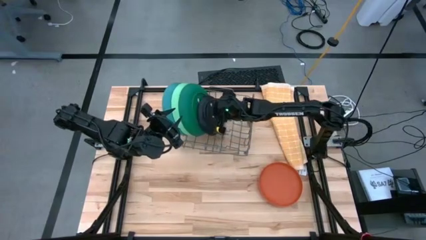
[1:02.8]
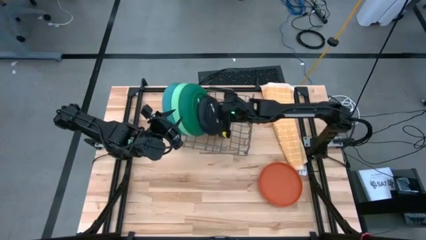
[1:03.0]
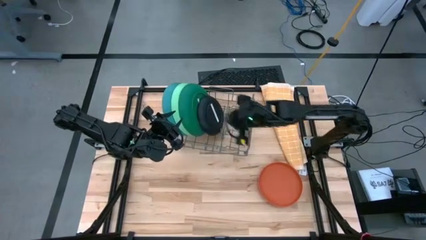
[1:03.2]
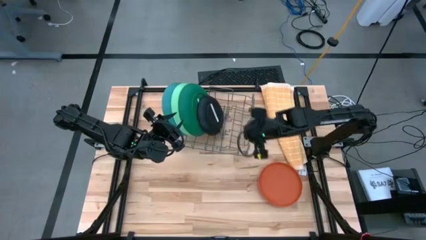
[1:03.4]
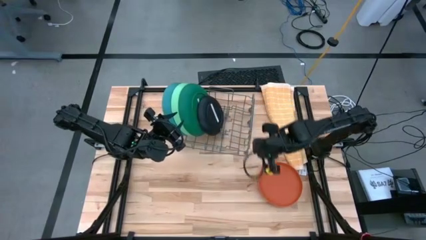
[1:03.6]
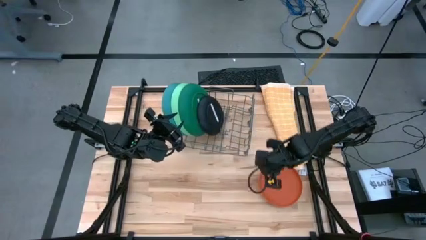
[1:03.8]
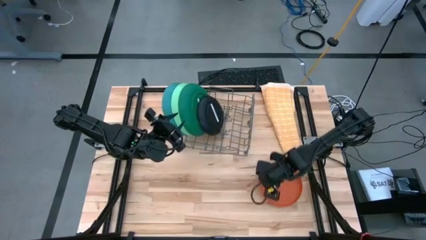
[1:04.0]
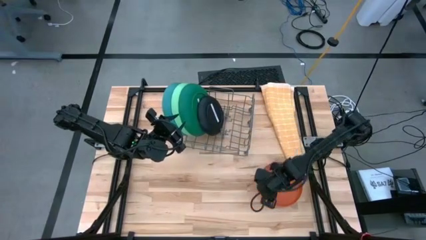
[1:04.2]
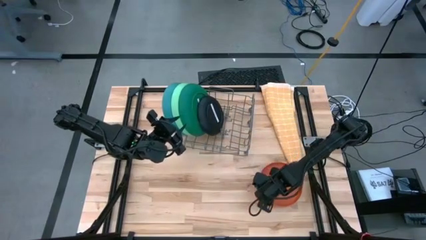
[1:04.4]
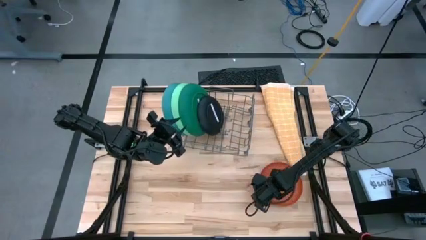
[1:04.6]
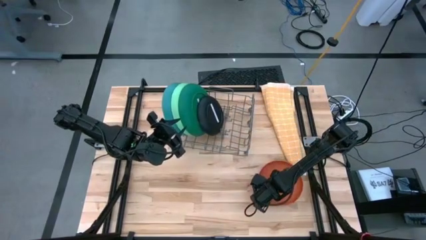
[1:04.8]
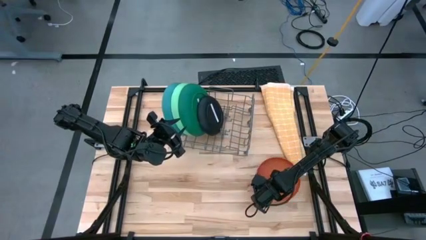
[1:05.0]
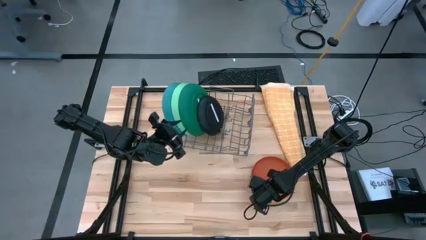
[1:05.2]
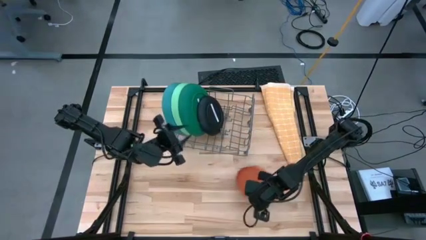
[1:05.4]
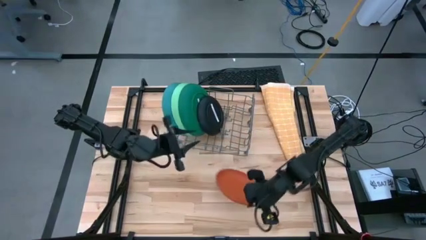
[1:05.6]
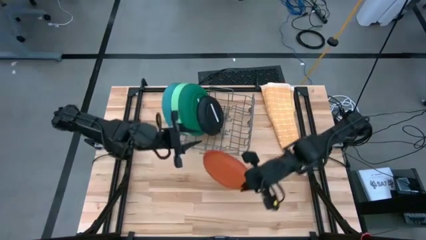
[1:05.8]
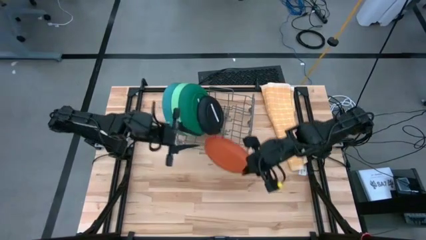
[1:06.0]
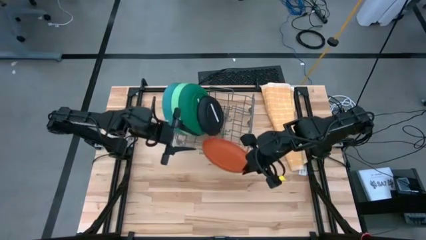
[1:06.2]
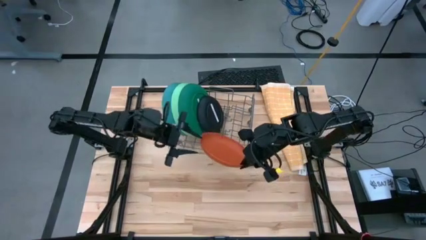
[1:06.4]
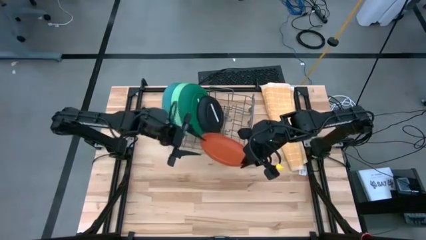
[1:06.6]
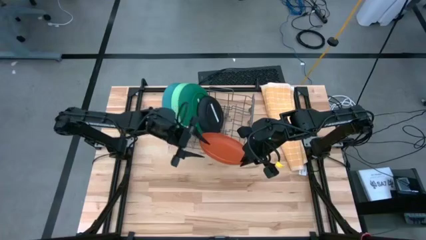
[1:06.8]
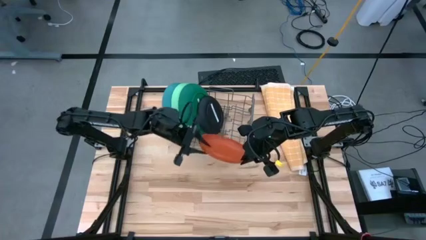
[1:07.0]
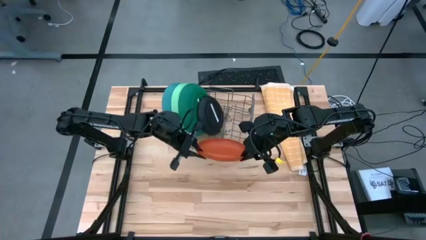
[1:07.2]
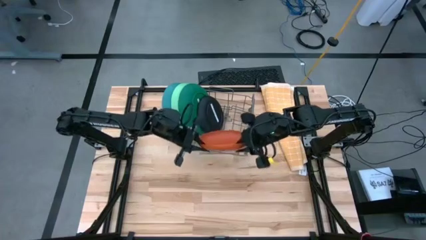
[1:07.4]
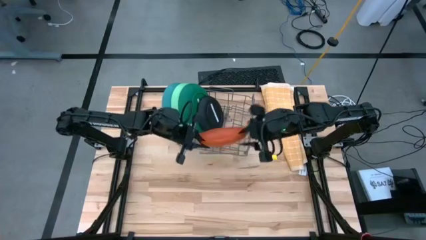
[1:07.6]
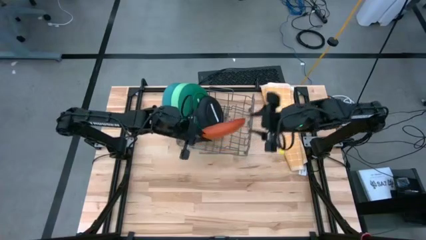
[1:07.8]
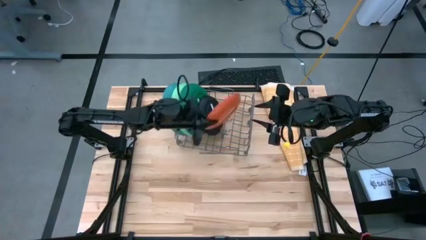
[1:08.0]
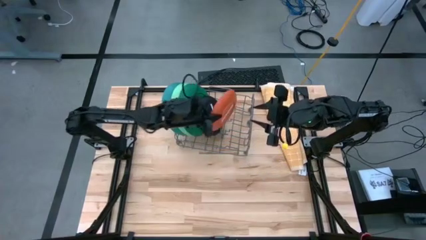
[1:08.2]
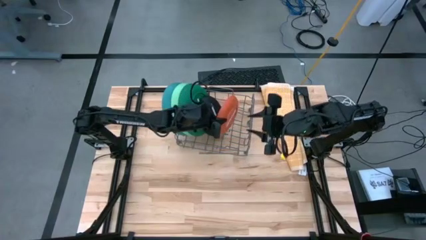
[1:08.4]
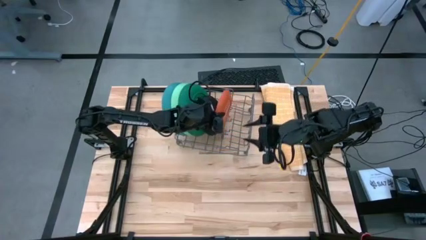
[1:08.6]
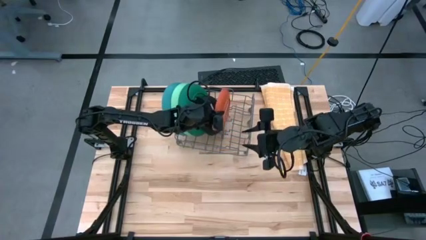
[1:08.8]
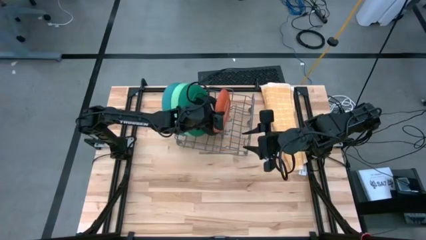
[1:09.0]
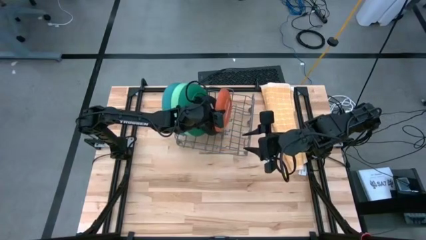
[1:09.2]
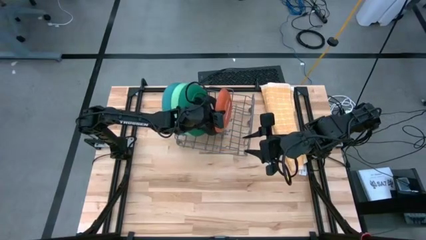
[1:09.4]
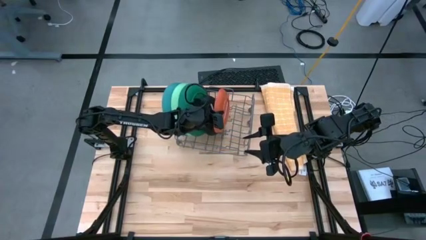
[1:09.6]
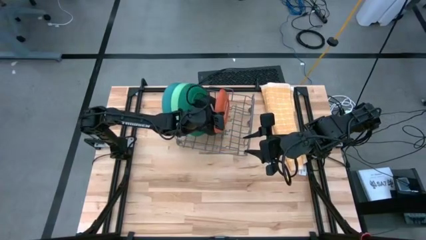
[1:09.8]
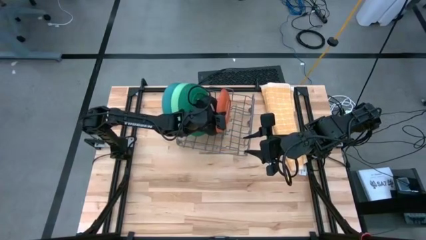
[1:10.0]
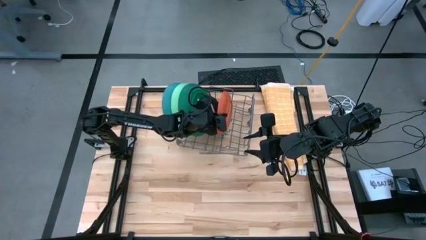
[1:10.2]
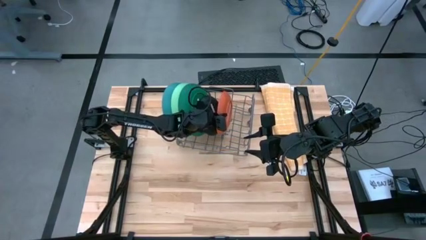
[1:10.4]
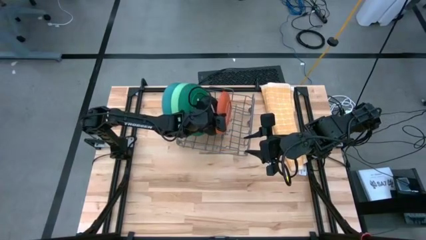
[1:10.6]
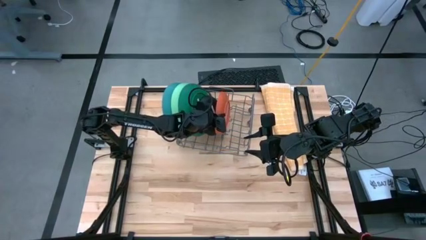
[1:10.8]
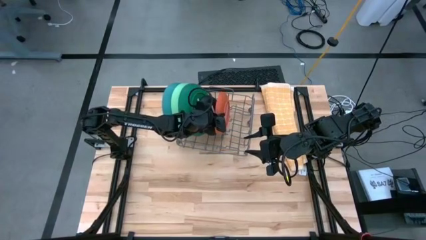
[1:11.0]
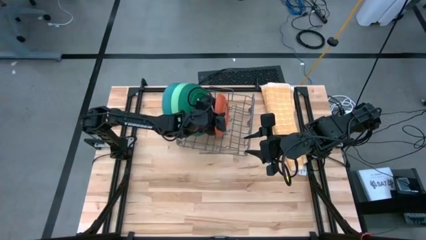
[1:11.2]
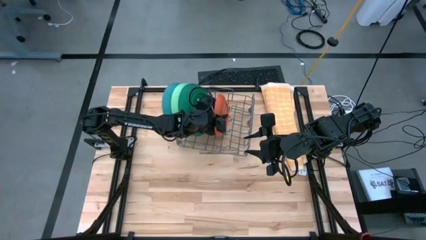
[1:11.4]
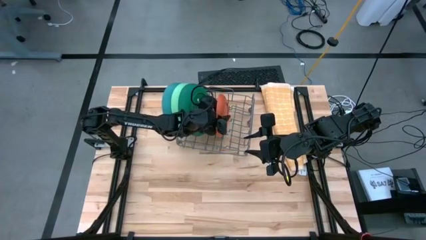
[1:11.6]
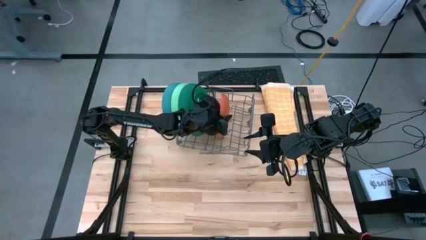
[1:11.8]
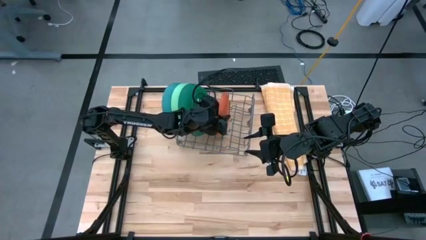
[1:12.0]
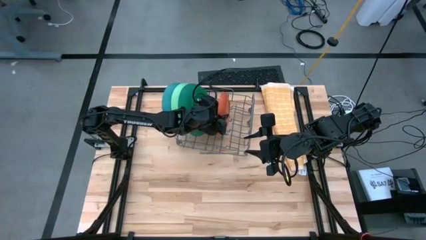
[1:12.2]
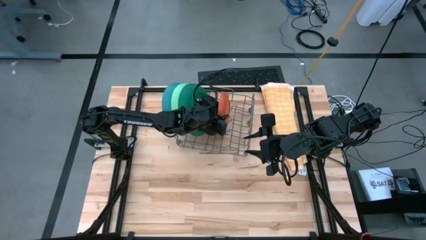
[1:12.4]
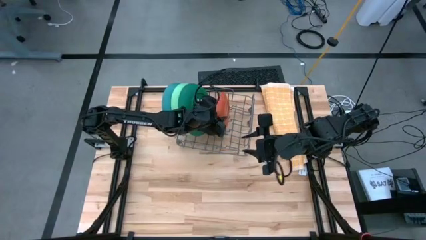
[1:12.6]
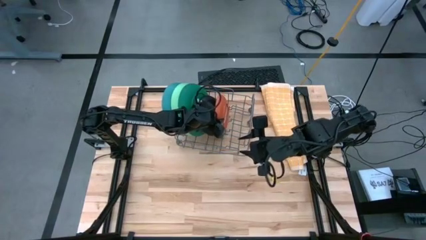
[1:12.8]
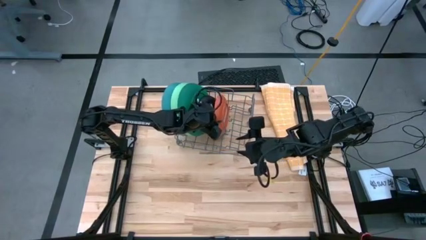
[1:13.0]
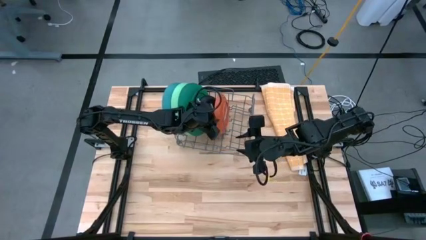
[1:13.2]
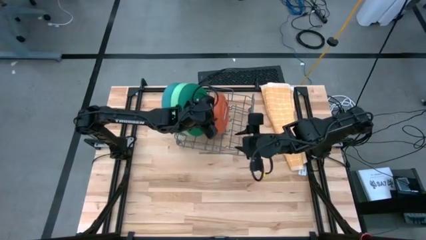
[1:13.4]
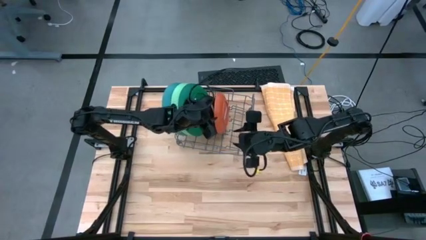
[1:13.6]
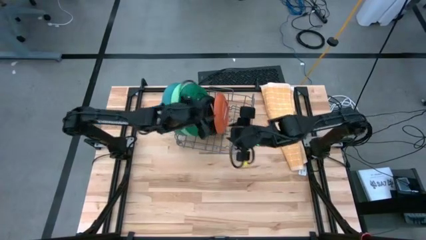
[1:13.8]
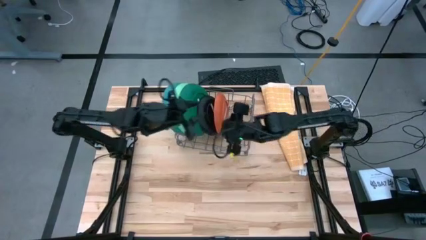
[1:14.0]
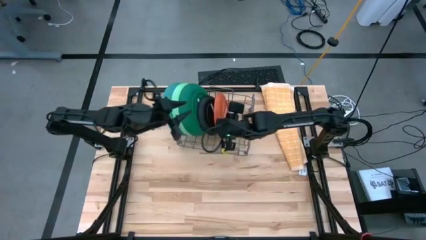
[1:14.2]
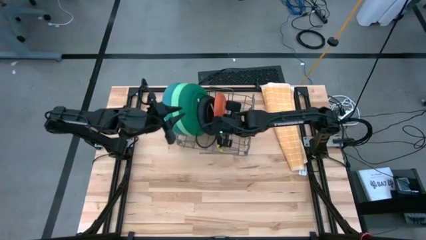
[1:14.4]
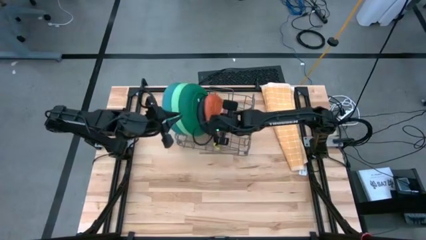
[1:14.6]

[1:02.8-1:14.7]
Task: Sort dishes
Put the orange plate in the dishwasher rack

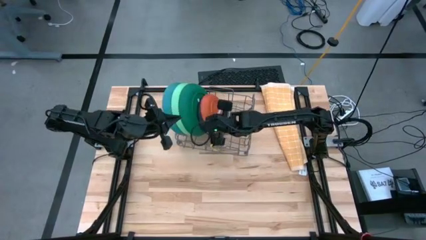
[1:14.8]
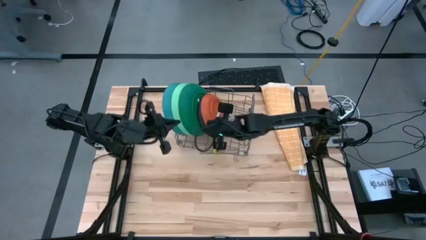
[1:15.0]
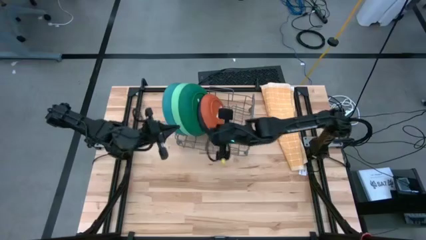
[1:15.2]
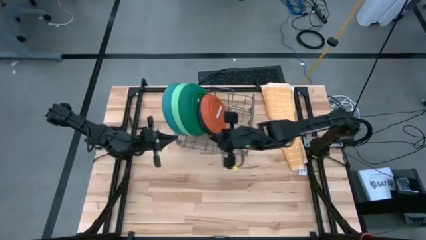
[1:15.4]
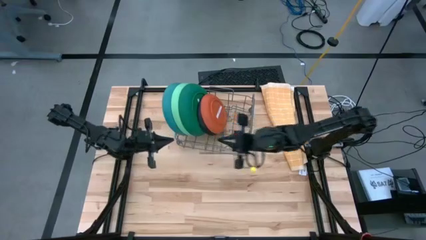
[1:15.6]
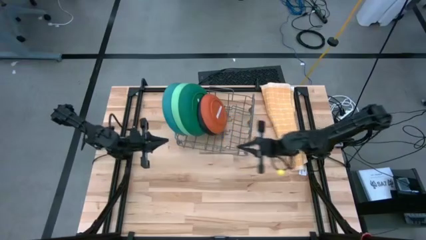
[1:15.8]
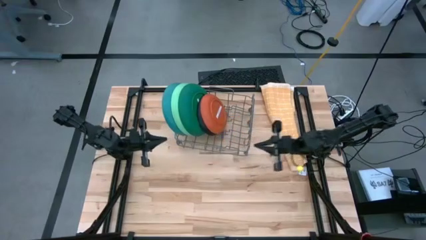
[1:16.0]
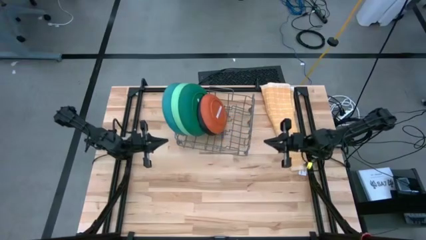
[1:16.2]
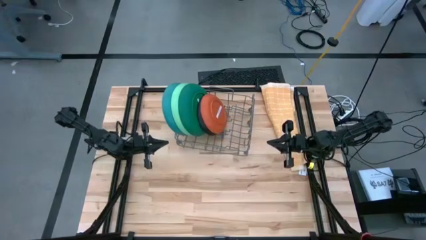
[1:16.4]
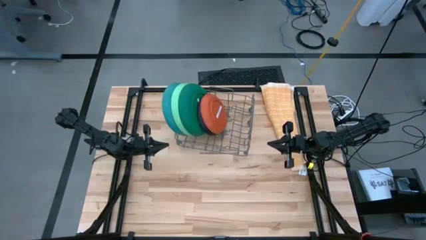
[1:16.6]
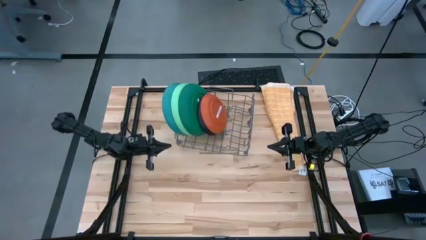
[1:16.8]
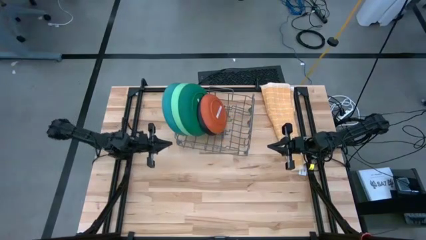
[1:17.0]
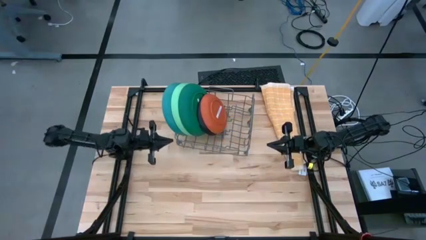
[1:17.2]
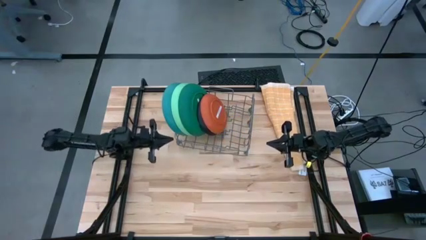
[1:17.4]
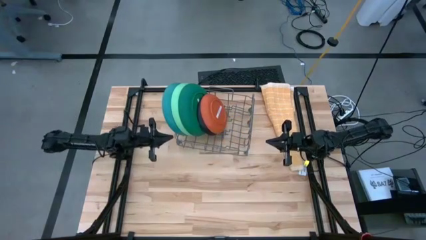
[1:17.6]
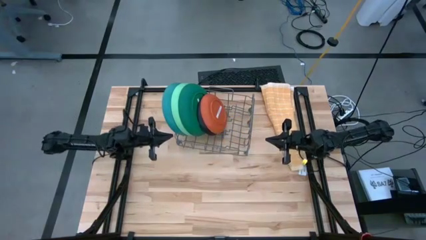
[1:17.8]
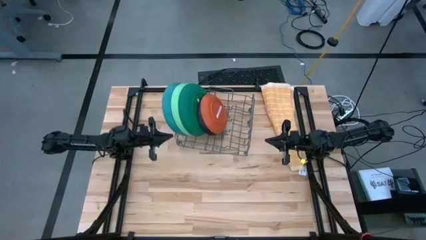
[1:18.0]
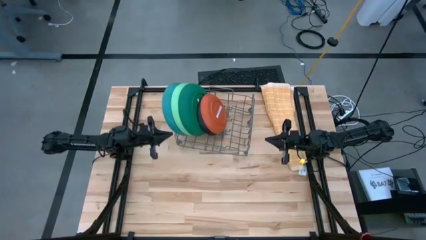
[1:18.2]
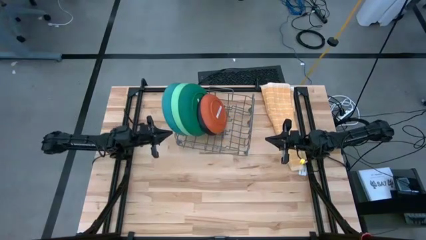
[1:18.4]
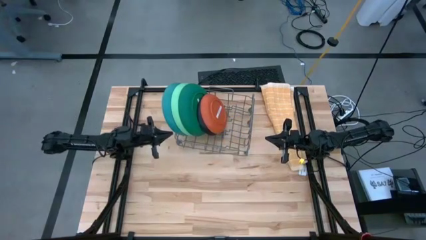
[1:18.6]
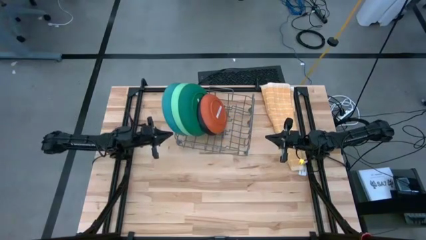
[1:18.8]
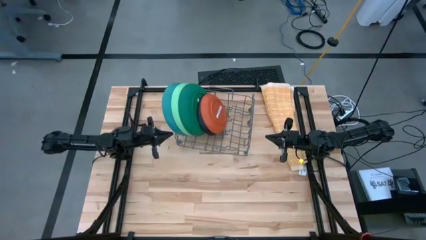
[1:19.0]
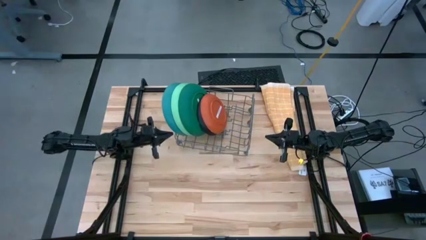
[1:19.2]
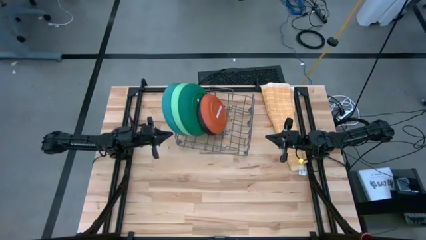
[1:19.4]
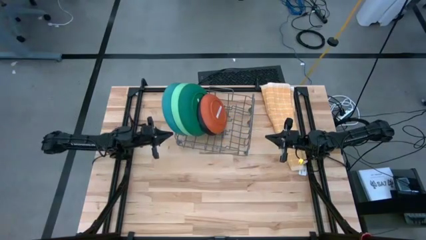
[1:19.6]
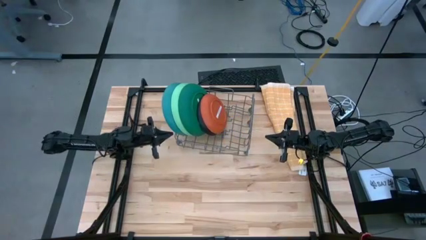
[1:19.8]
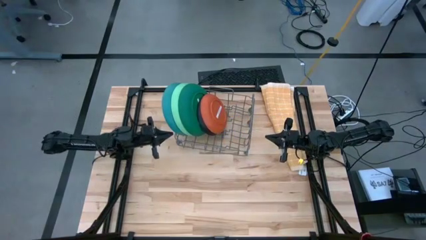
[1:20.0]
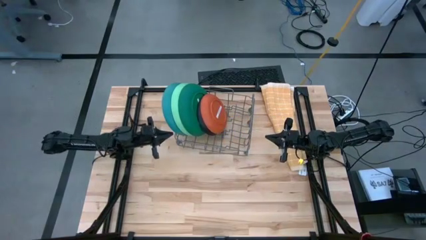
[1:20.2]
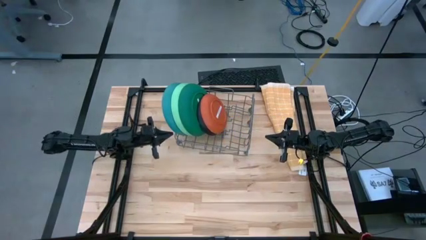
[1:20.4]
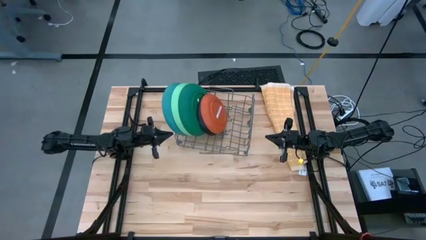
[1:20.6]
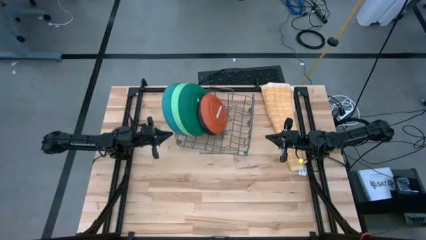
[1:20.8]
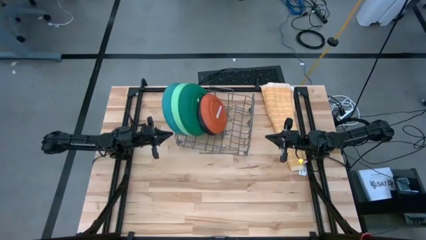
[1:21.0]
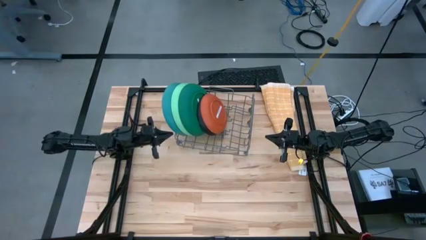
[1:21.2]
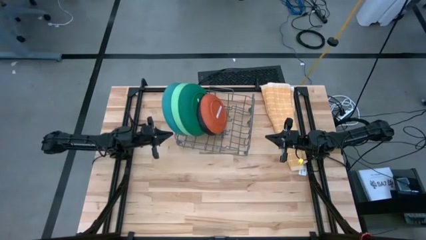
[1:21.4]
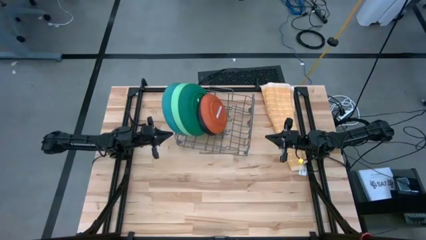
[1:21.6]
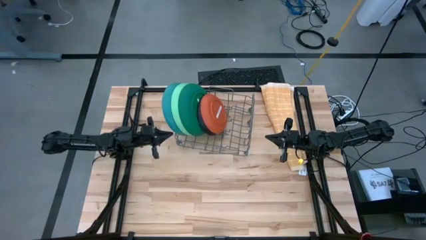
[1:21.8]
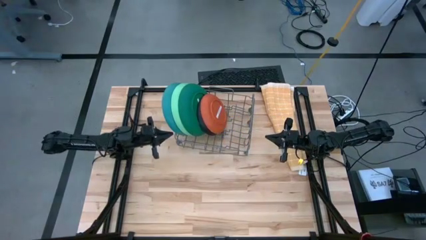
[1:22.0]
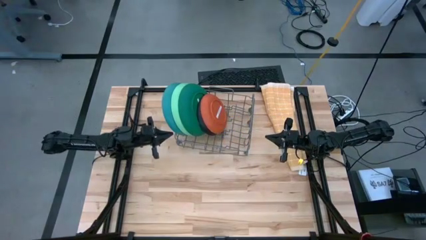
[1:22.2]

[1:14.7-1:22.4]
Return to Home Position
